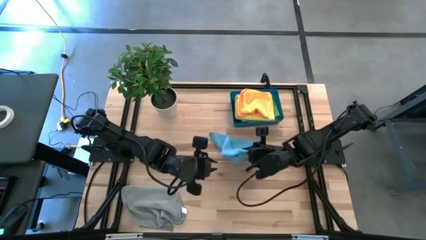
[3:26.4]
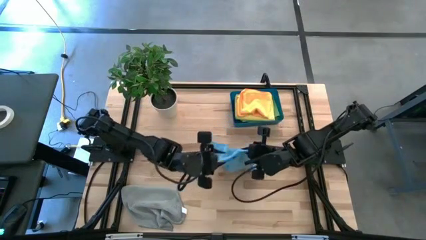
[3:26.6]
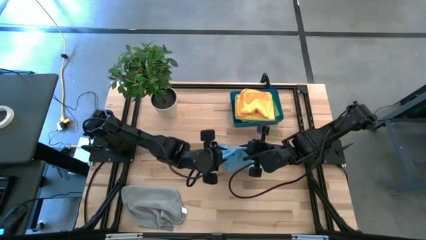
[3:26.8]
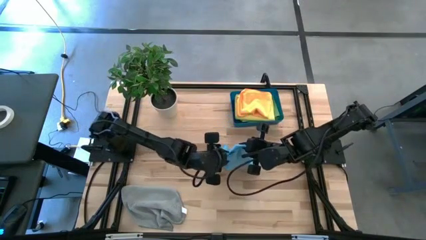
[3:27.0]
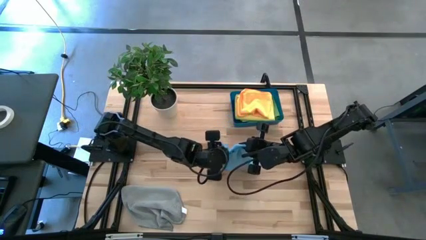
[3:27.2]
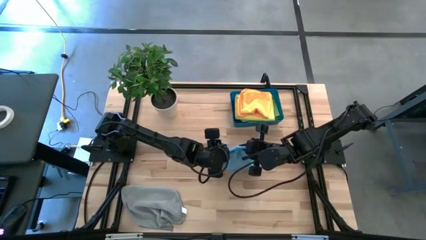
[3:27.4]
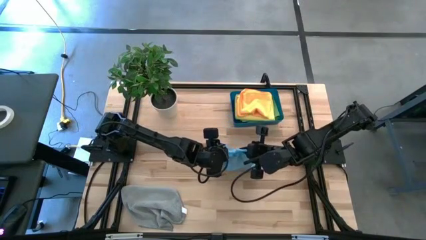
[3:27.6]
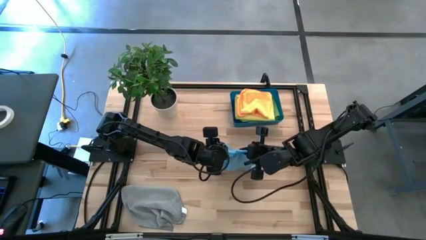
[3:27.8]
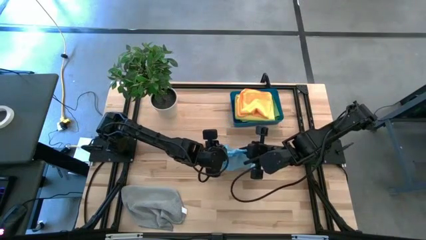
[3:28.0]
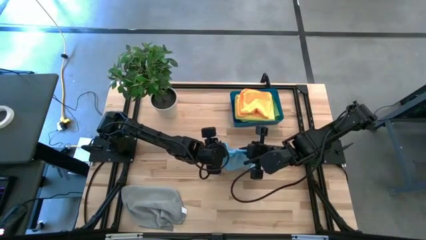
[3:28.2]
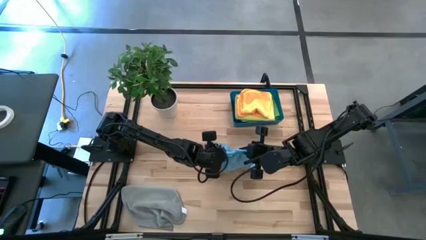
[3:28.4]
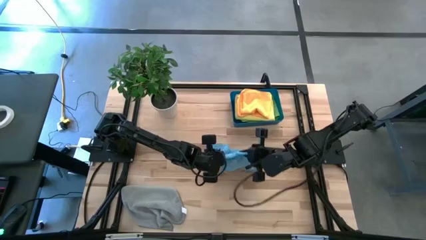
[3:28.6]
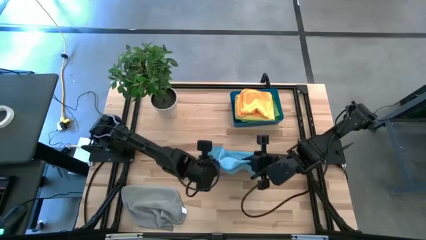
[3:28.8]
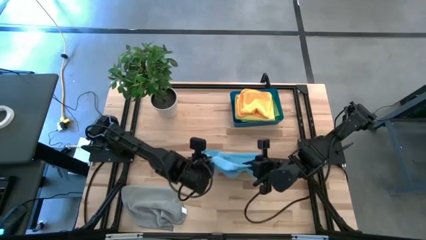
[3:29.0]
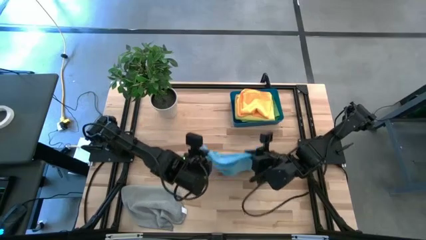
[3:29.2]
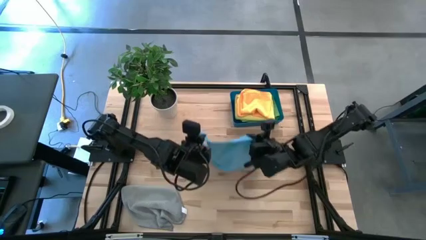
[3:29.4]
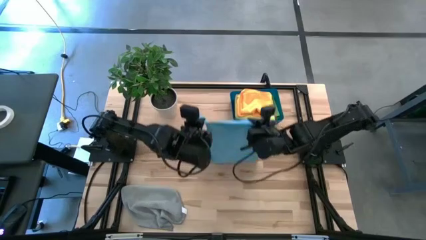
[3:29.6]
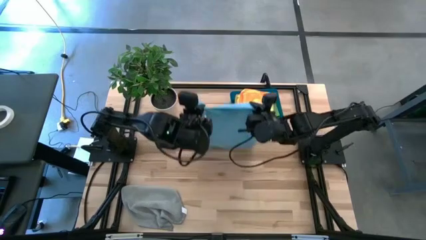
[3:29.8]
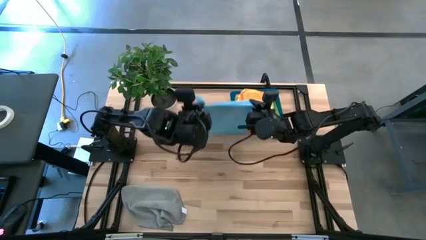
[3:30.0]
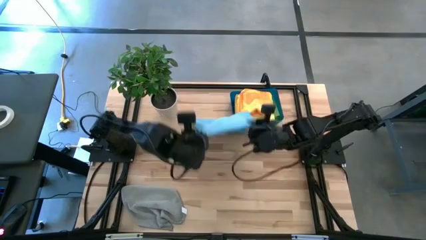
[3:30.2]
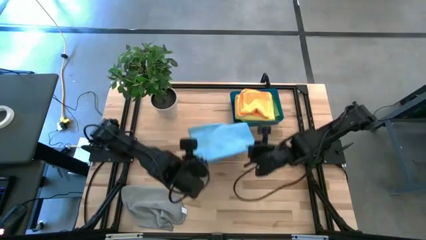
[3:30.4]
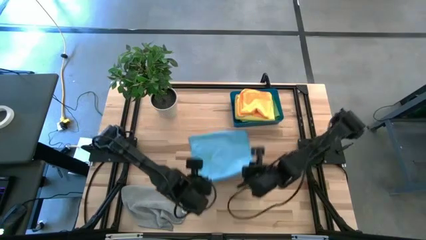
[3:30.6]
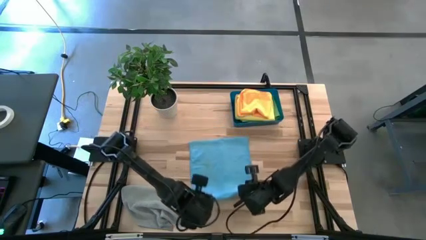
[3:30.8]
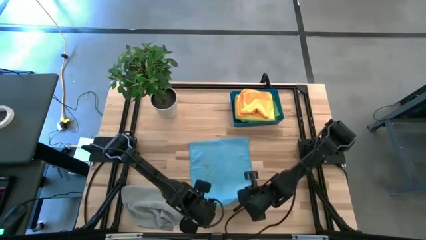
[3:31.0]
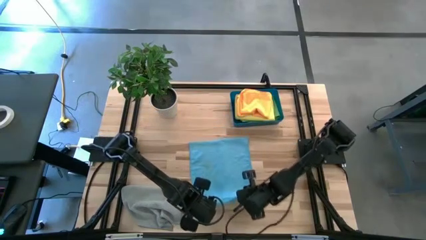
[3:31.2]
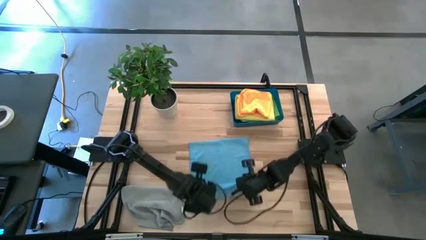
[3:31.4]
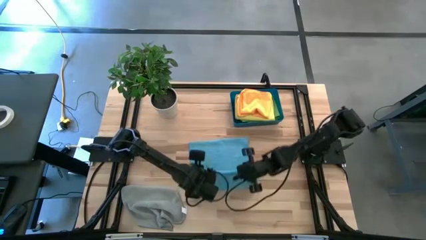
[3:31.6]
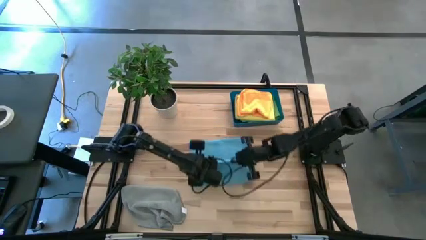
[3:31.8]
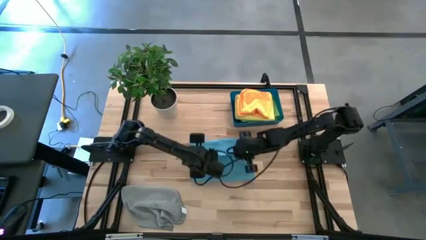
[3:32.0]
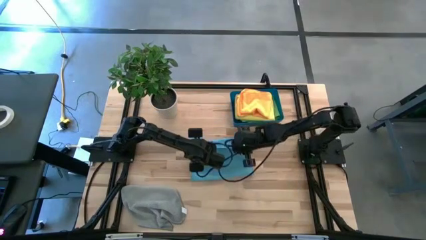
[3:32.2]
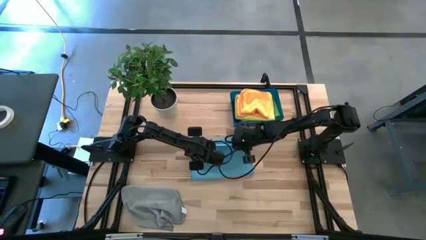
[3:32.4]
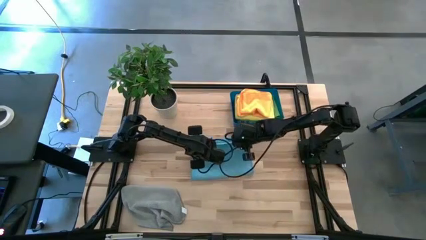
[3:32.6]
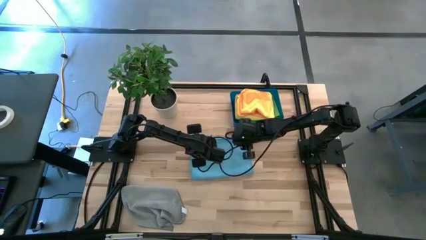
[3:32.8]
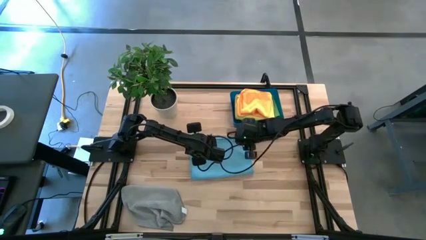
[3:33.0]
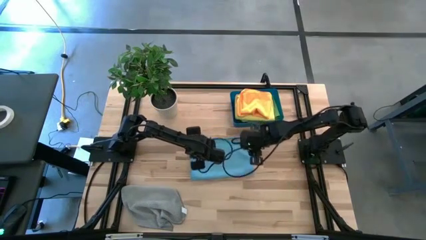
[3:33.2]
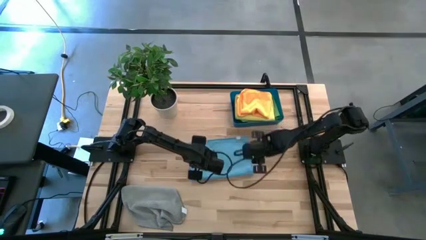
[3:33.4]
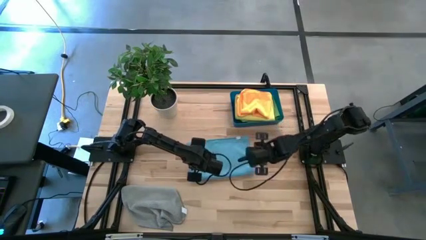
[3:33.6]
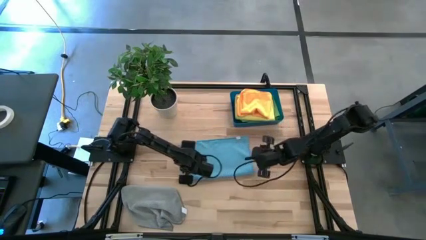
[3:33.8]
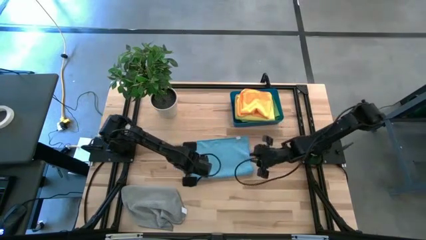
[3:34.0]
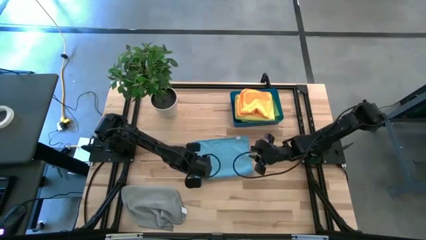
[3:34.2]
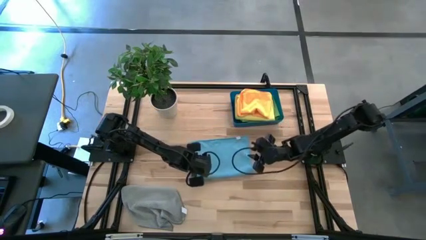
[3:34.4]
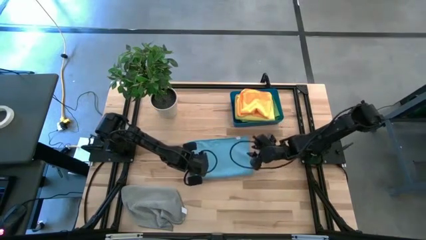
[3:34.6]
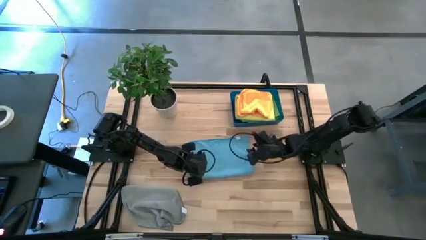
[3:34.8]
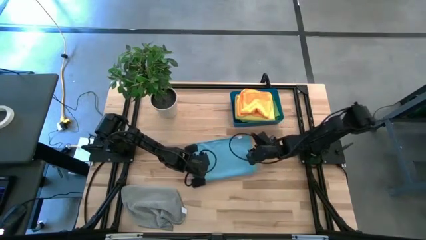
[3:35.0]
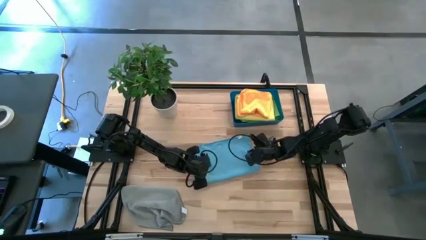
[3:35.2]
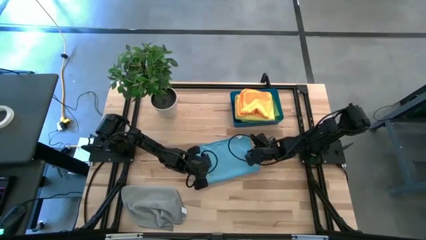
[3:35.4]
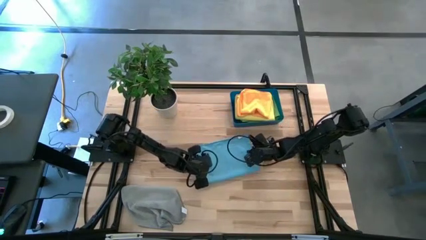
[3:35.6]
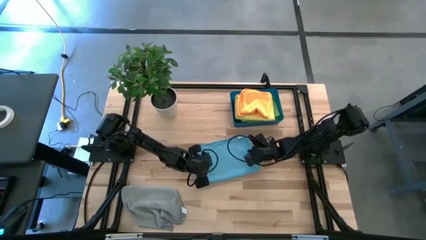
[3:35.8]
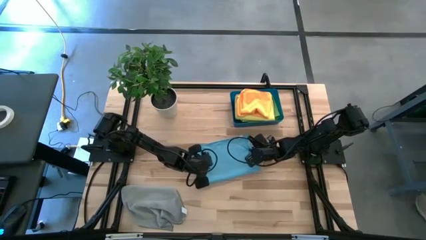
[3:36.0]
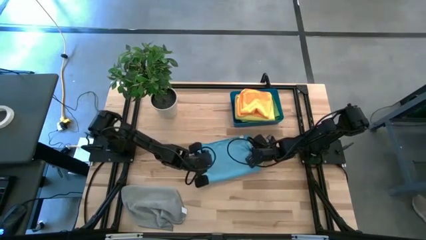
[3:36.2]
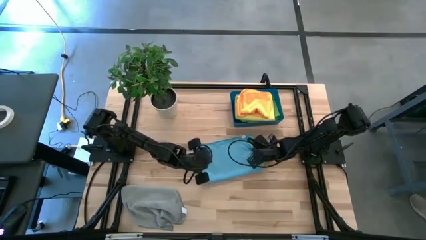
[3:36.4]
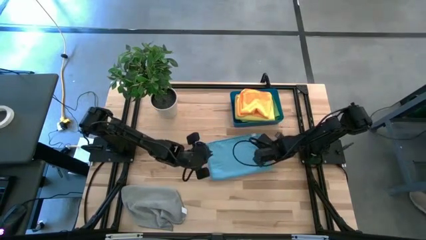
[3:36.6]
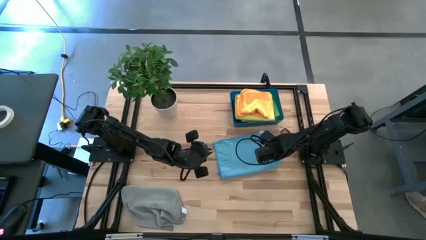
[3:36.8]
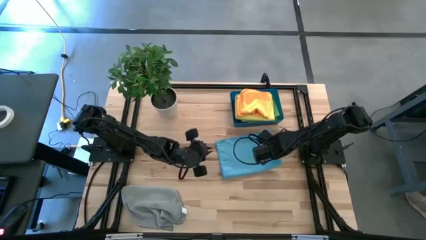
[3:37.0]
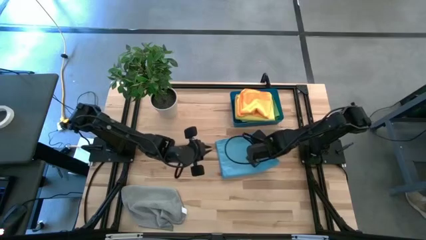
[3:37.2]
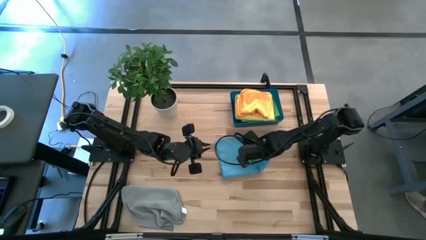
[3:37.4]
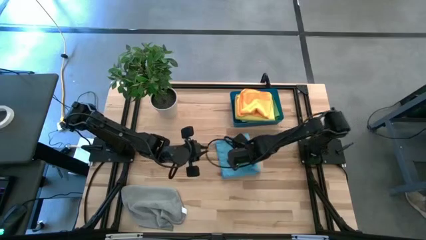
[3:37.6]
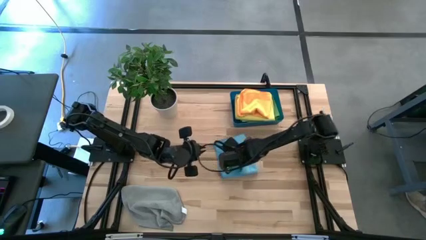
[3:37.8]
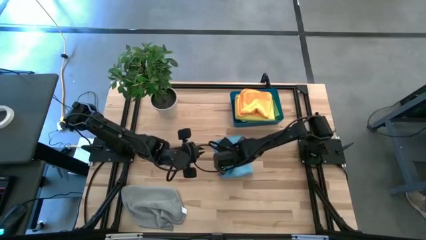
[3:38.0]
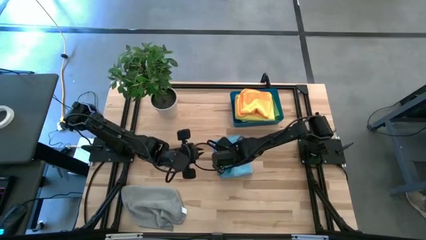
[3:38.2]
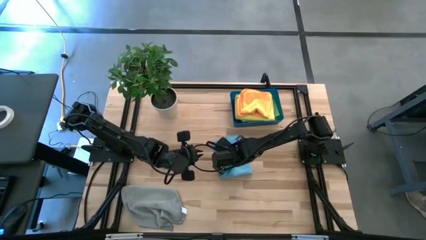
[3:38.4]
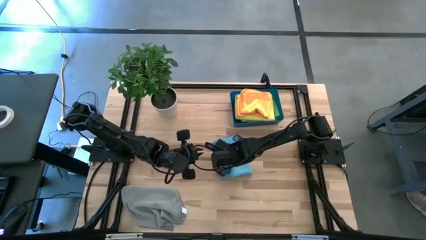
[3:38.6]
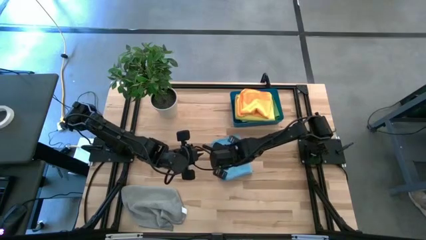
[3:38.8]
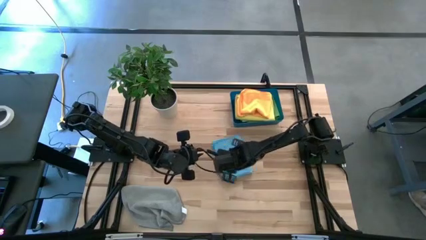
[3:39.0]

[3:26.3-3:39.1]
Task: Fold microfiber towels
Fold the blue microfiber cloth

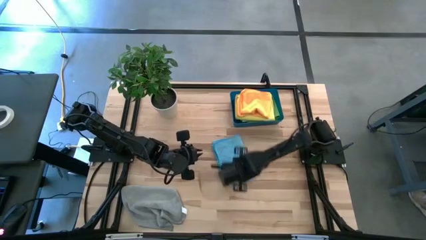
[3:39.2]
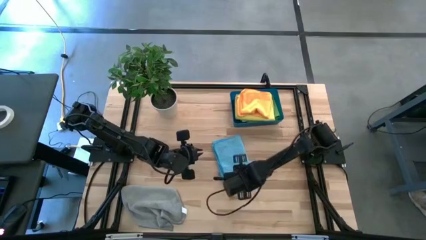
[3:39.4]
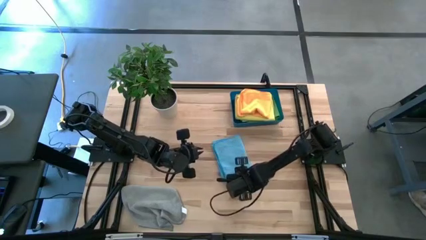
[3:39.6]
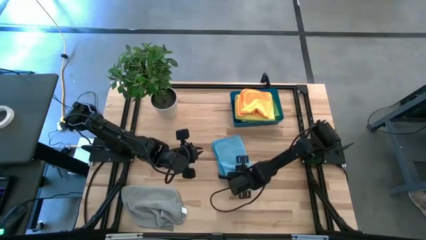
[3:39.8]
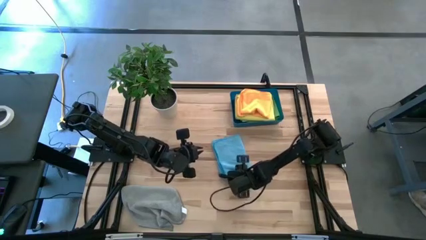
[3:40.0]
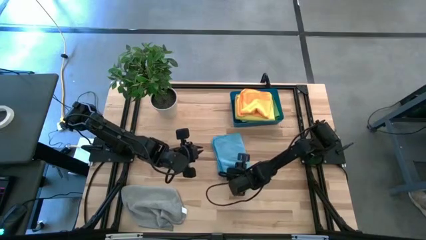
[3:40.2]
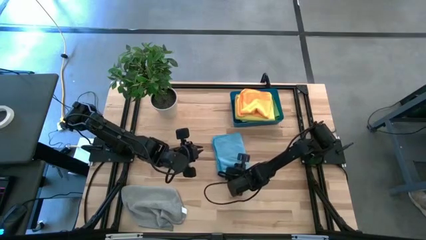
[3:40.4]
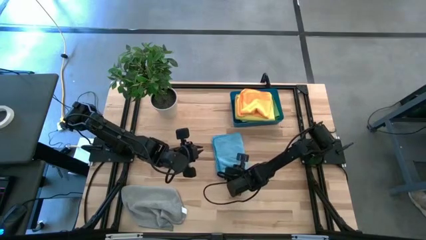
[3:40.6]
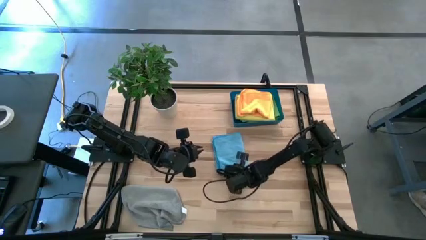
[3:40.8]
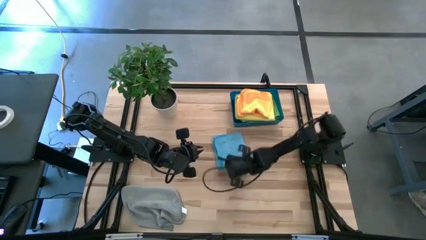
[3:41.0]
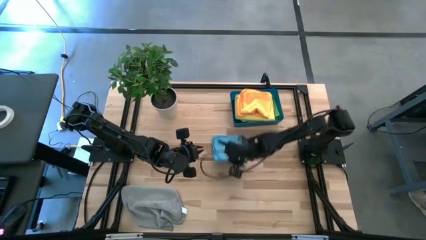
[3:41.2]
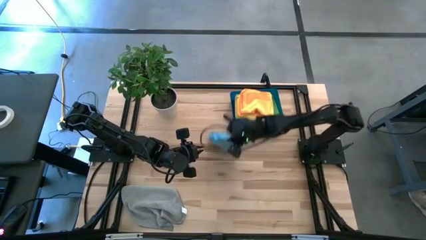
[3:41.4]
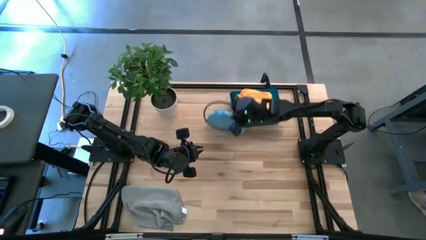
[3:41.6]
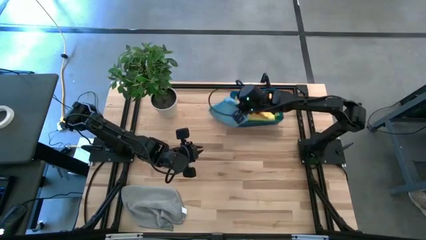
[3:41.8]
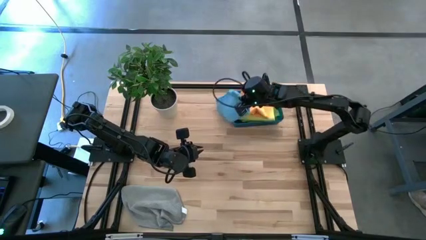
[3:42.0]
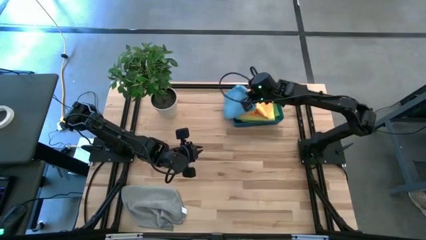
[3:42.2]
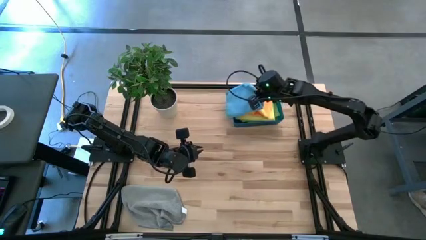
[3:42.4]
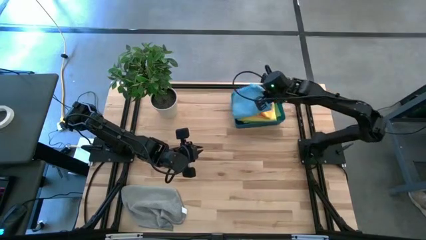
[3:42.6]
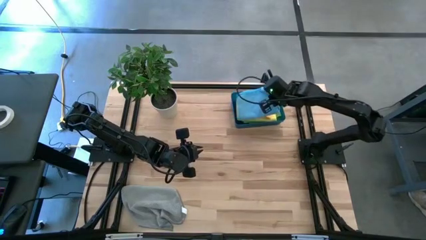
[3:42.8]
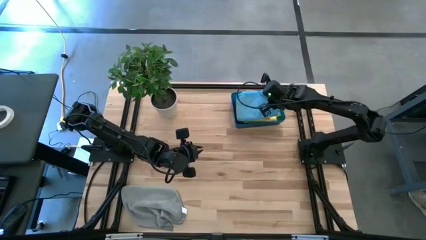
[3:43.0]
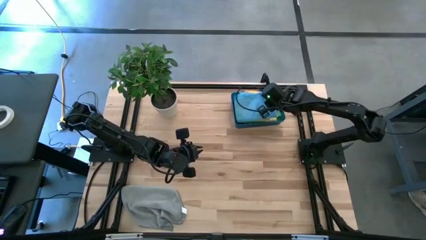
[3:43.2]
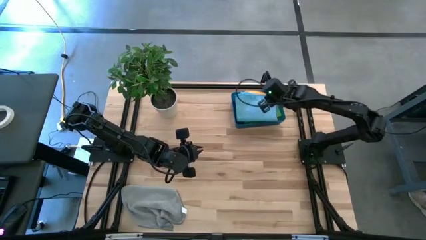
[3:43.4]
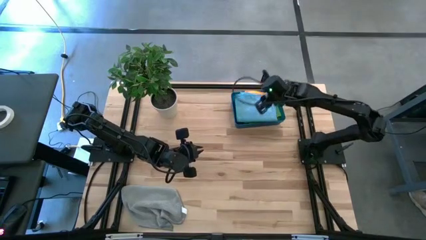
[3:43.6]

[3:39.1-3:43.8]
Put the blue microfiber cloth into the blue bin
